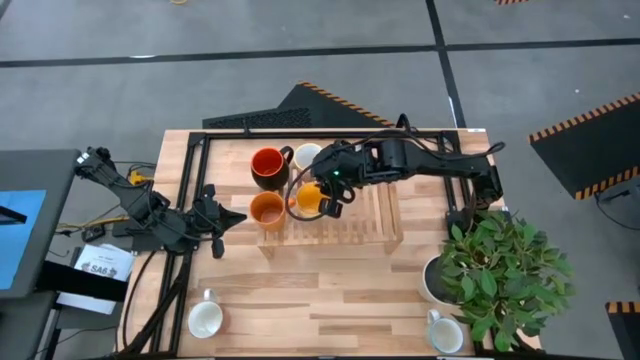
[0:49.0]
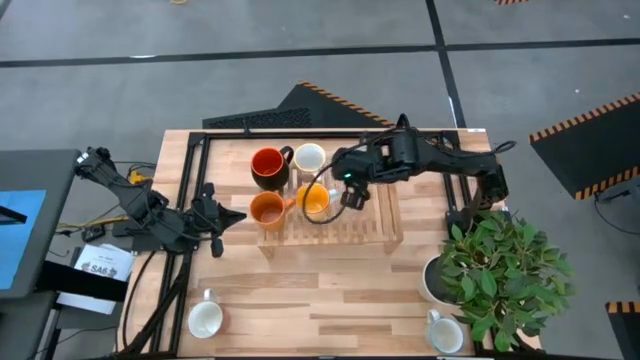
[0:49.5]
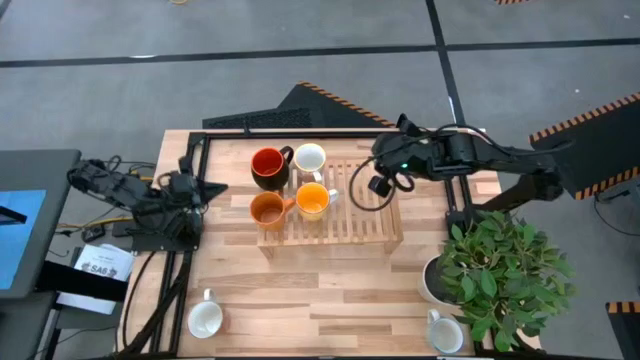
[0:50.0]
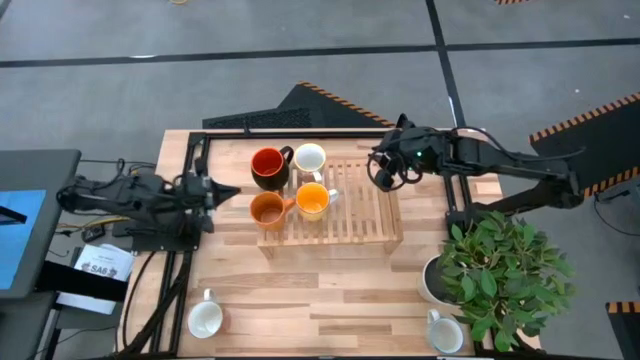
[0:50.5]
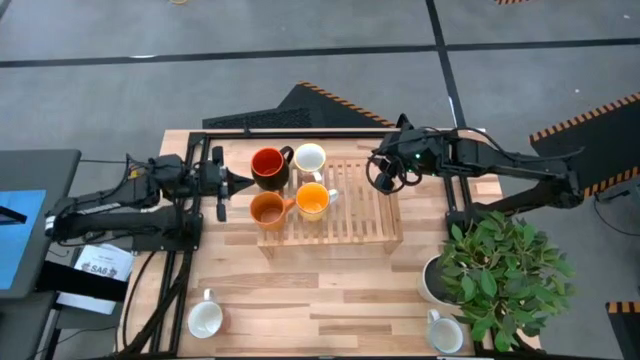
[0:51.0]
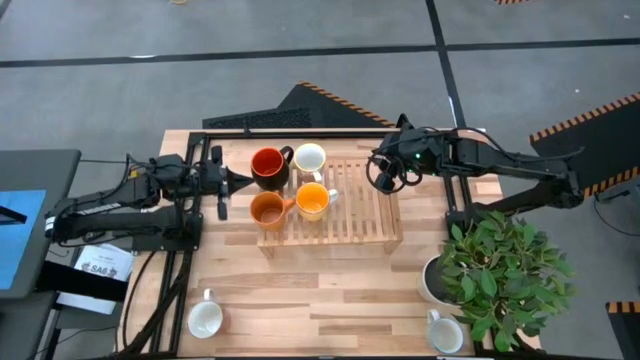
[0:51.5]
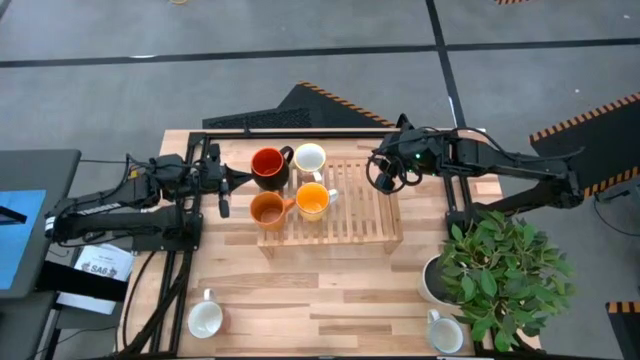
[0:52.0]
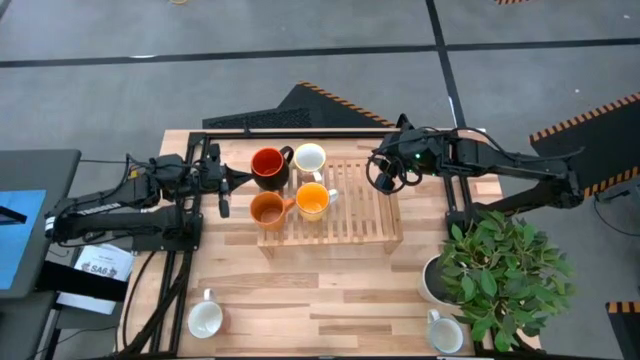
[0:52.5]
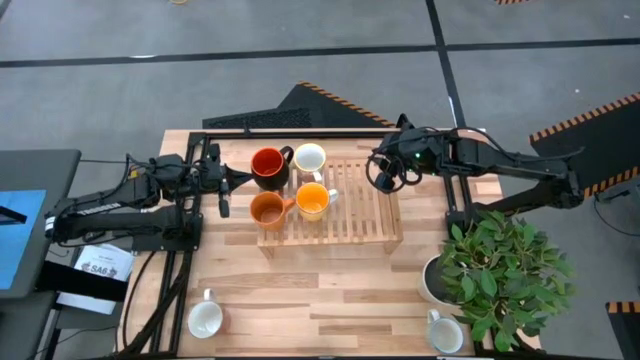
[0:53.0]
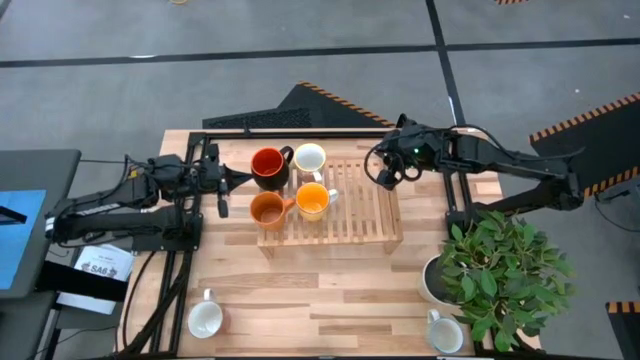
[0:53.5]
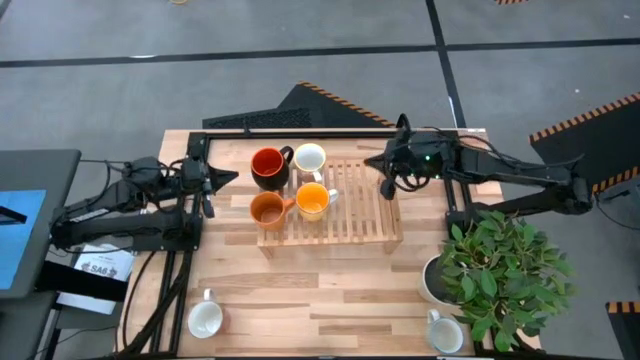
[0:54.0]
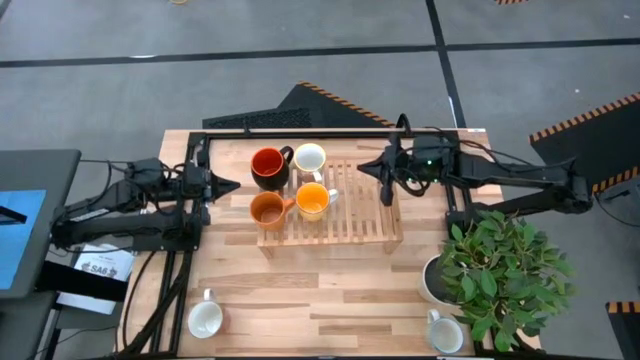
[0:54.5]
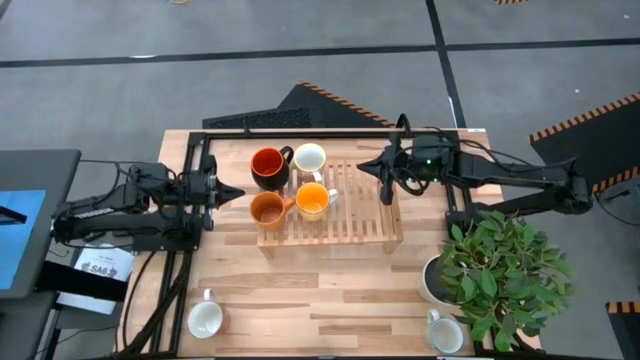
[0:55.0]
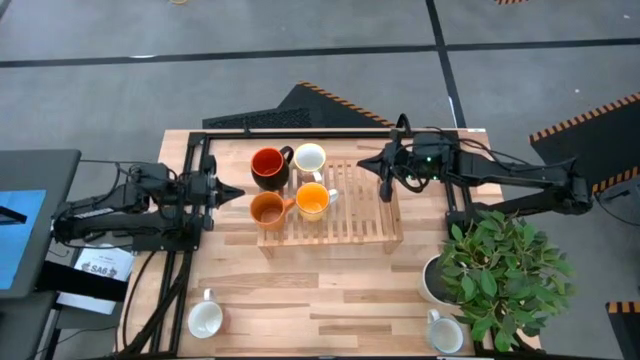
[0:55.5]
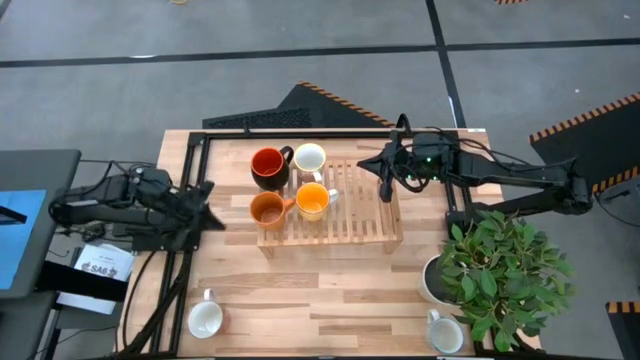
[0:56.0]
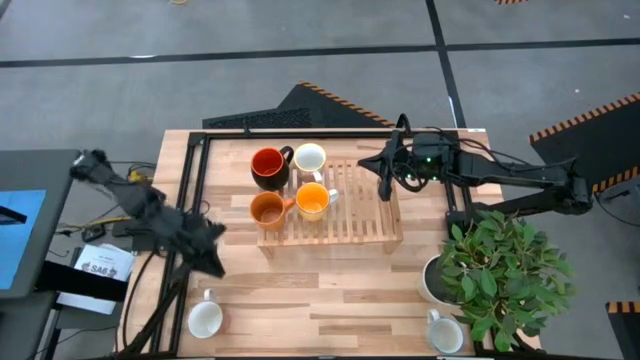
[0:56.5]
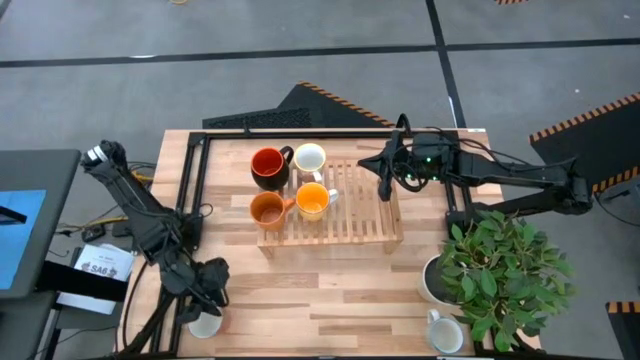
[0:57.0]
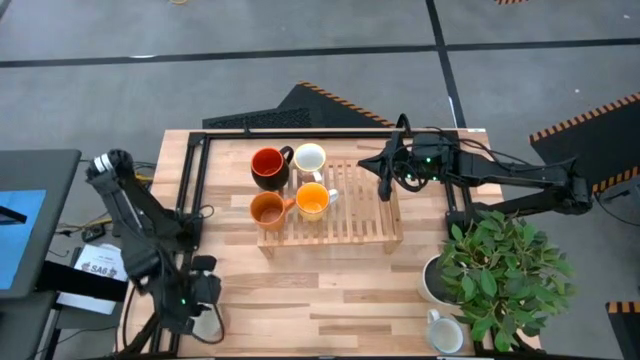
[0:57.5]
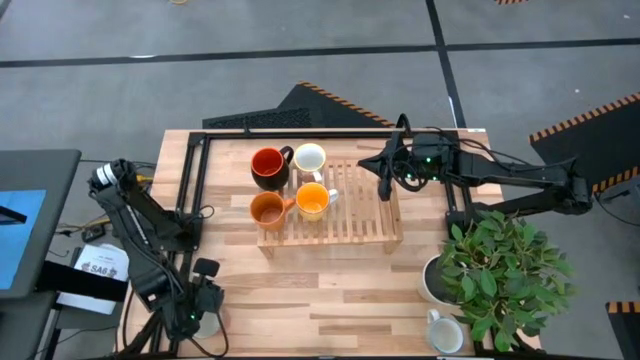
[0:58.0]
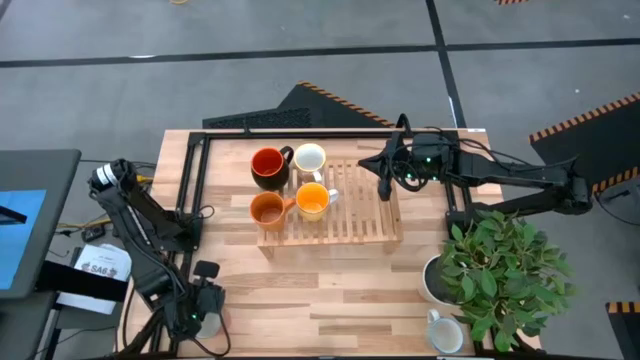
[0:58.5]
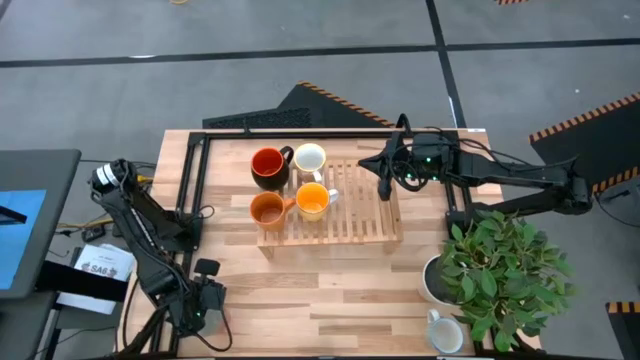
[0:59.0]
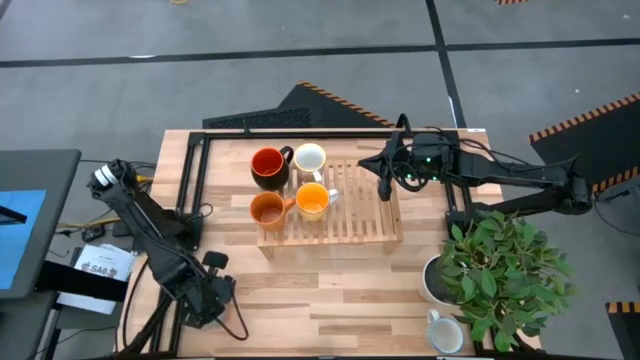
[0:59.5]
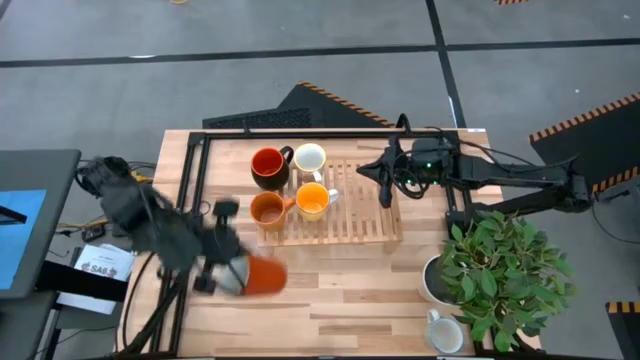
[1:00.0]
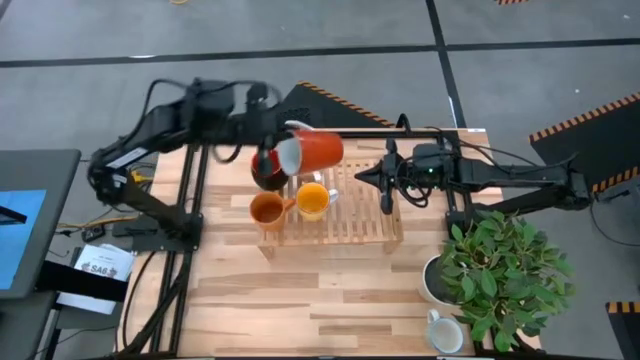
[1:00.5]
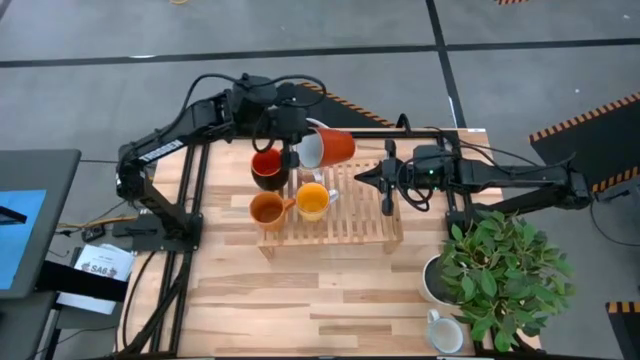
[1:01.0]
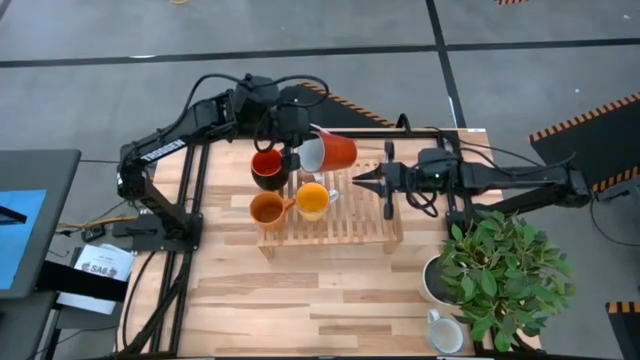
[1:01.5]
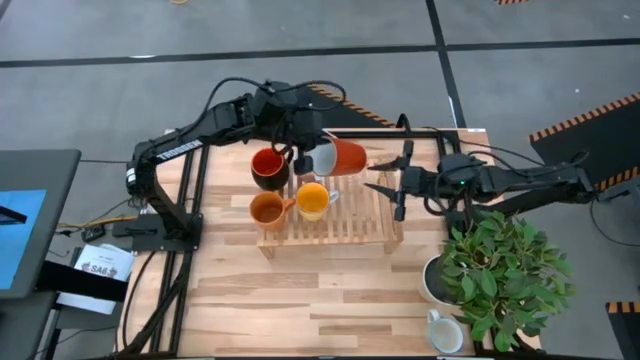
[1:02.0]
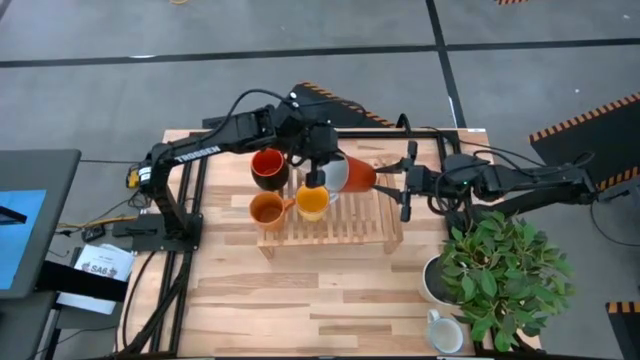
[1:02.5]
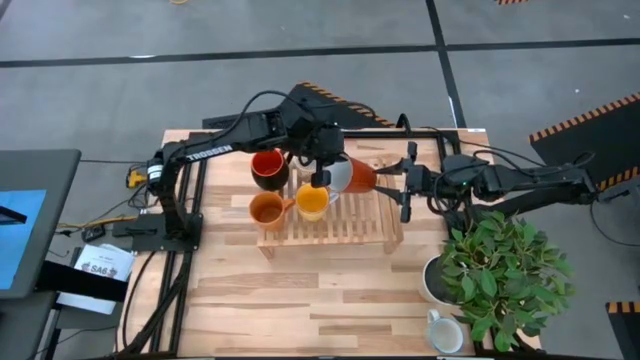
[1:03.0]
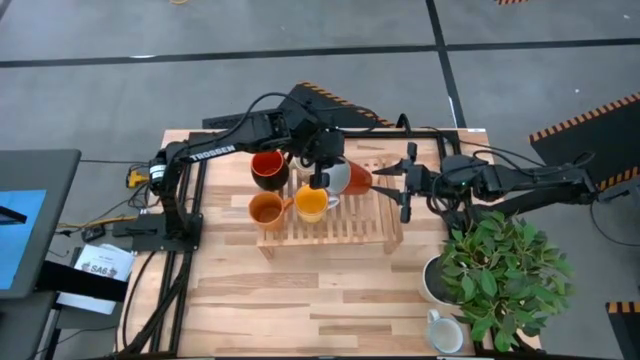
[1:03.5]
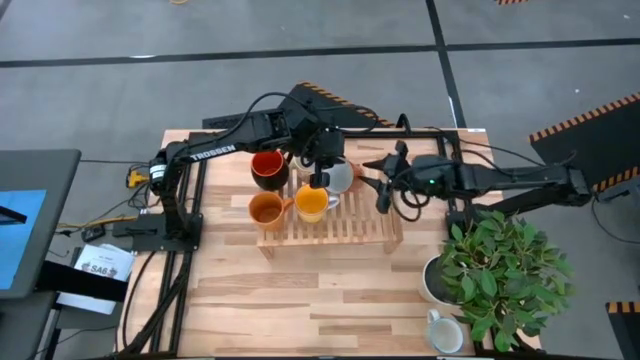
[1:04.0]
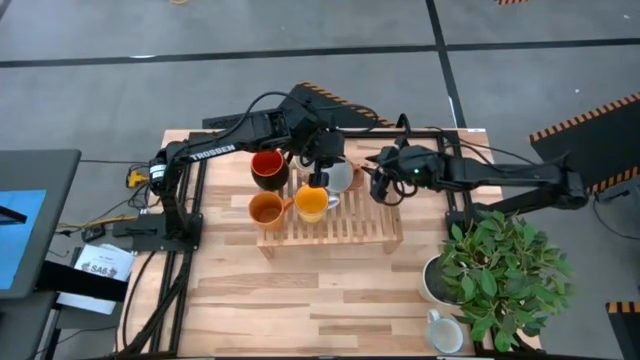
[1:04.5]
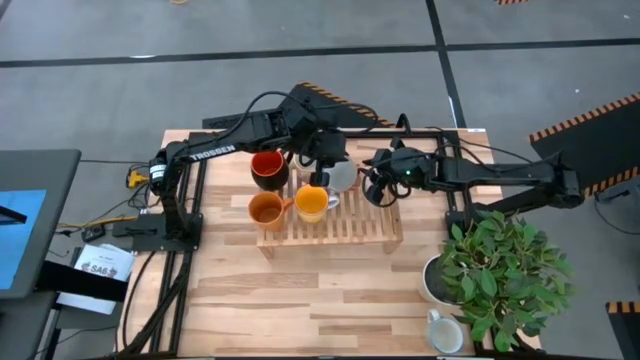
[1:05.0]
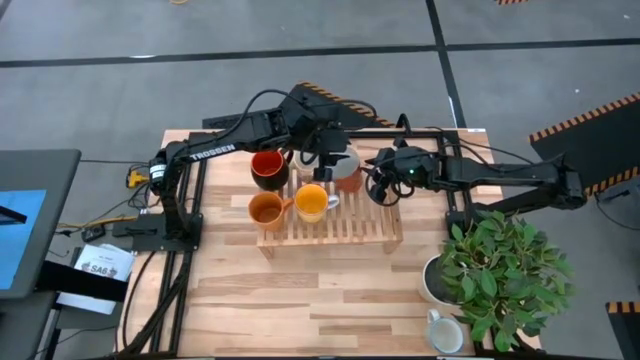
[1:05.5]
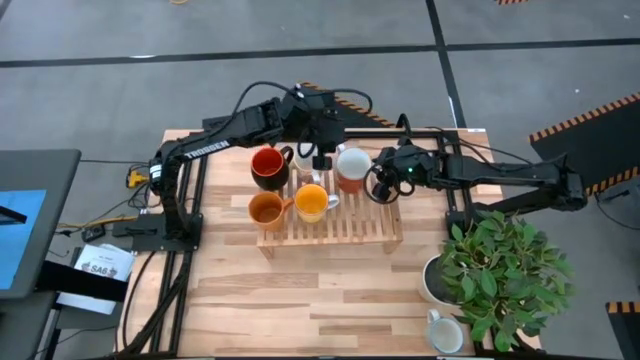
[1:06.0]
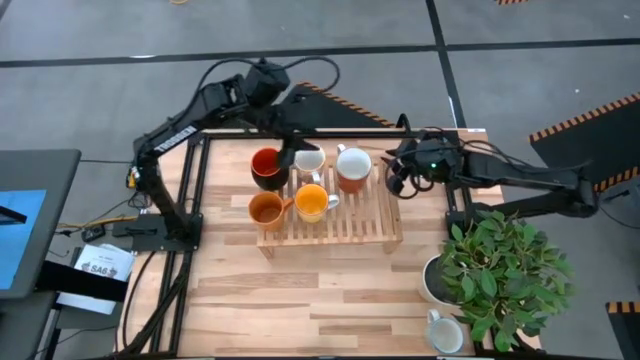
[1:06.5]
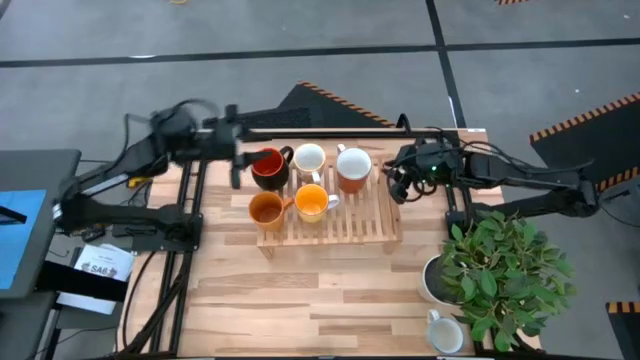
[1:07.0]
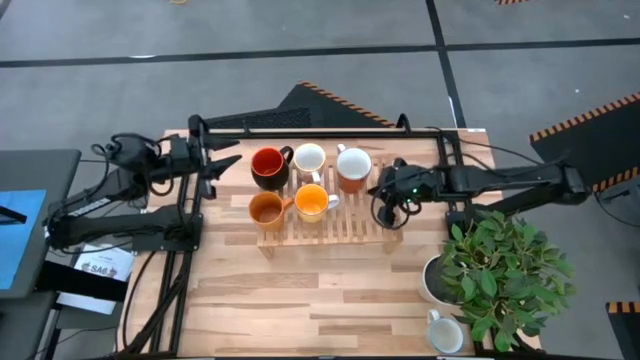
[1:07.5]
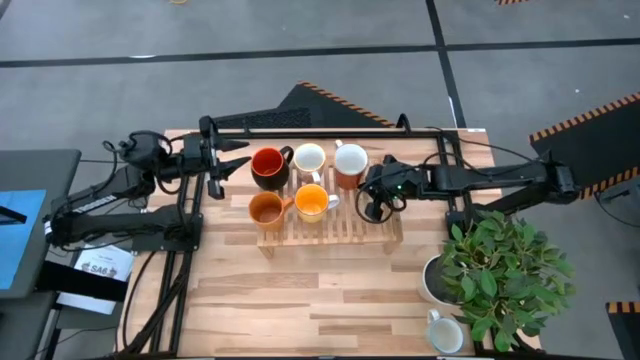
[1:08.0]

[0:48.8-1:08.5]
Task: Place coffee mugs
Put the red mug on the shelf

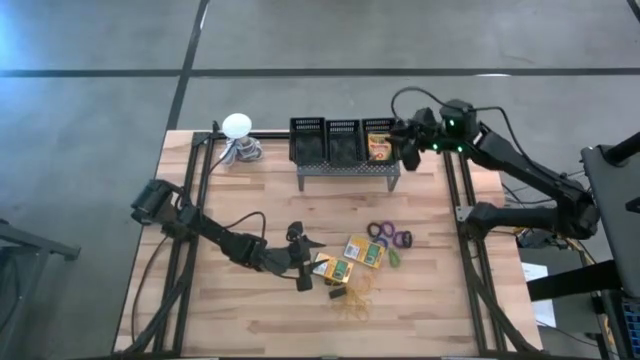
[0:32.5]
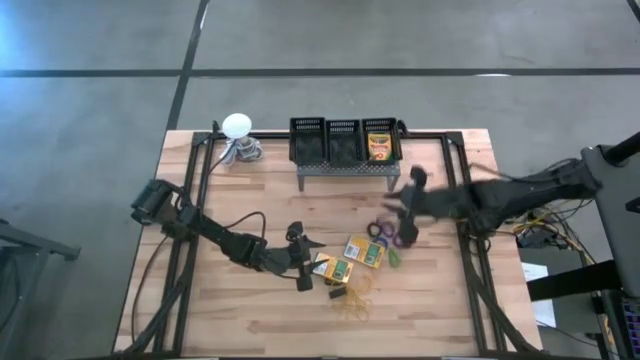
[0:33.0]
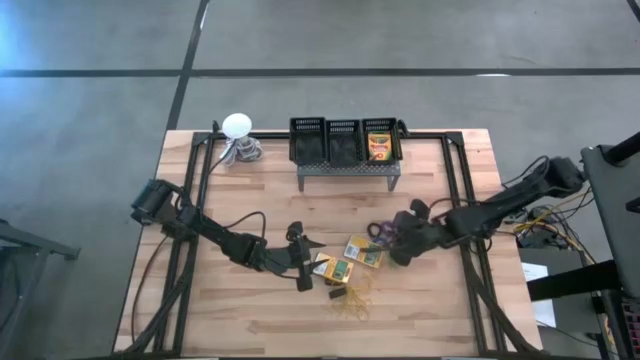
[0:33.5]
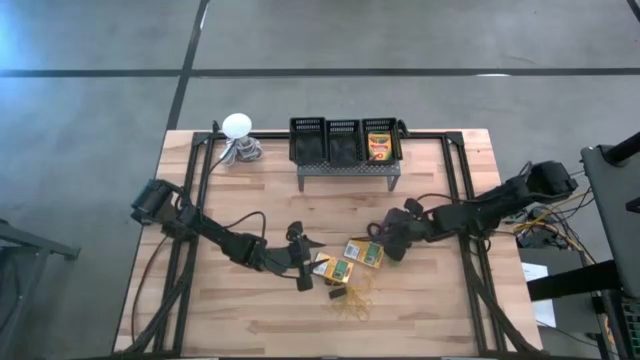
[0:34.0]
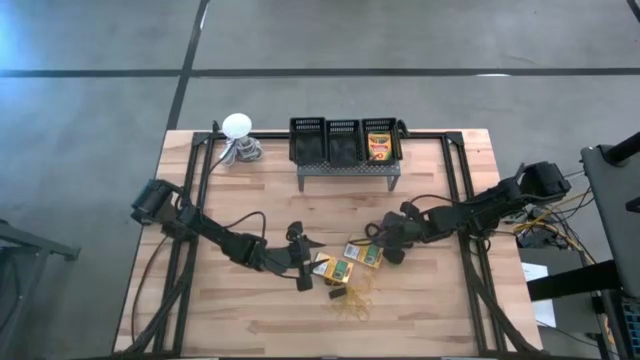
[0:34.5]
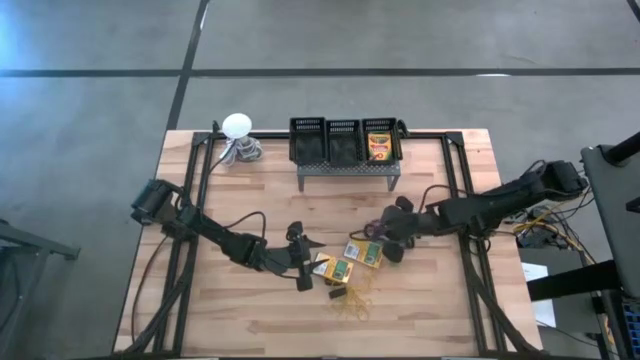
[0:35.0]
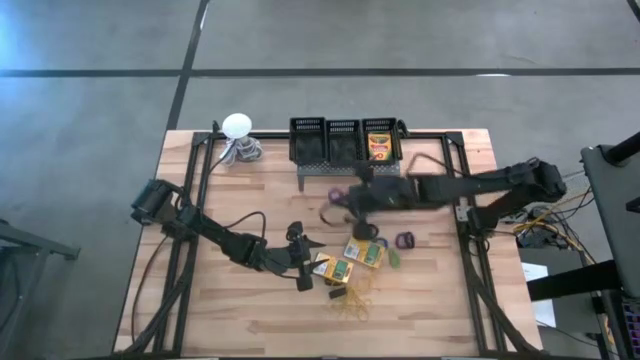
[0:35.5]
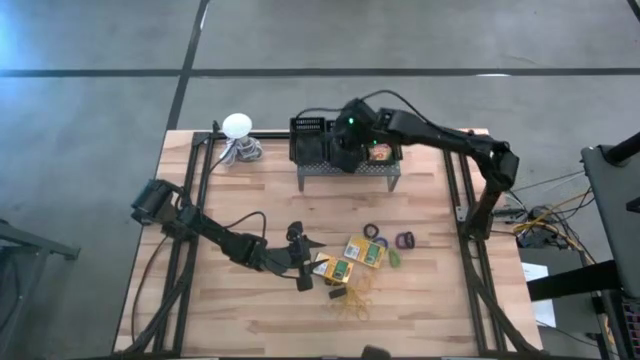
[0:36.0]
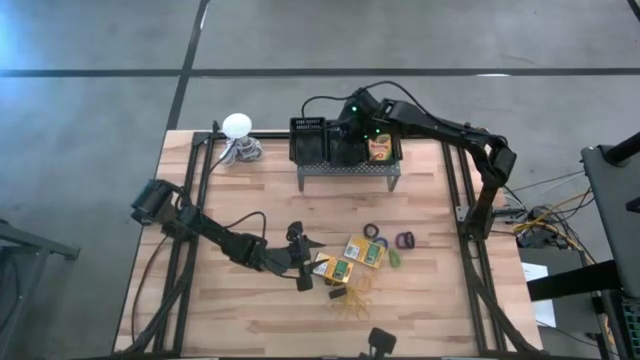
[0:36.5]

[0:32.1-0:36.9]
Task: Pick & Place Office Desk Supplies
Put the violet keychain into the middle black bin on the shelf
